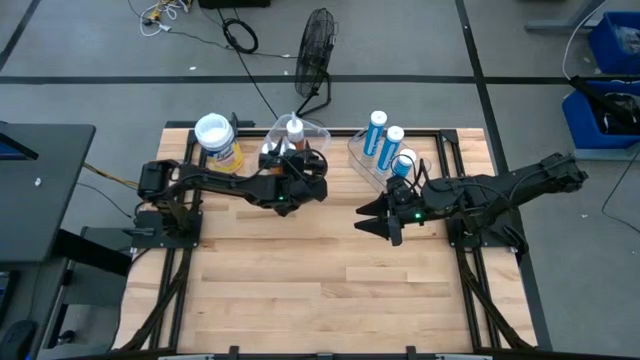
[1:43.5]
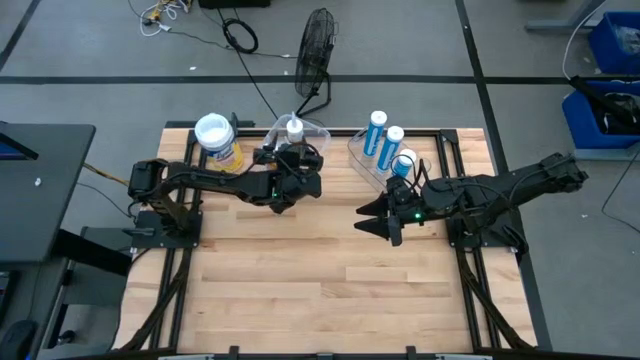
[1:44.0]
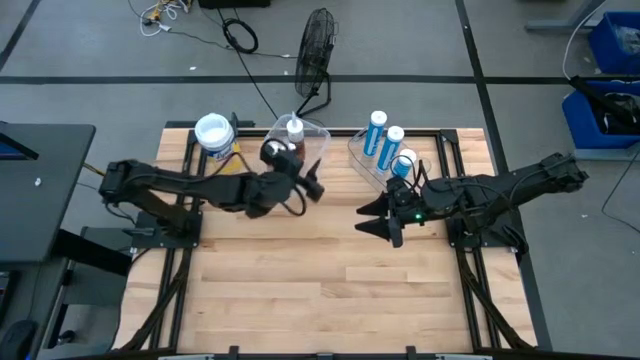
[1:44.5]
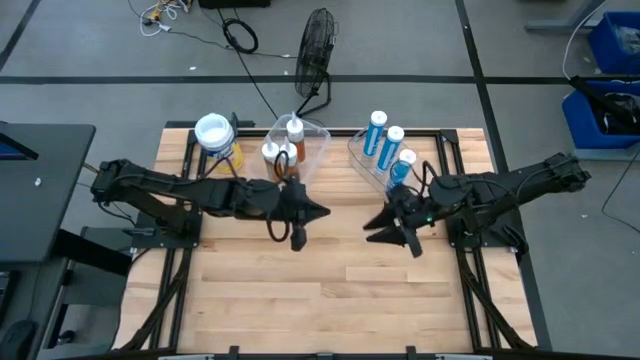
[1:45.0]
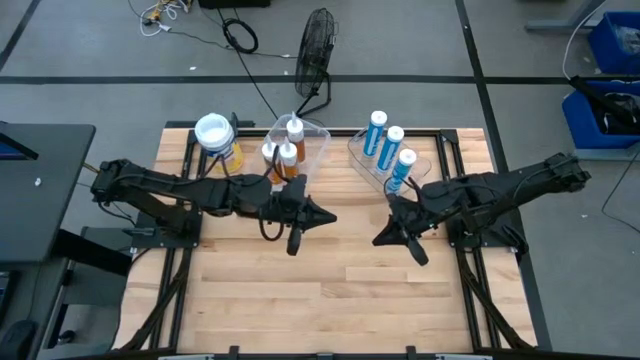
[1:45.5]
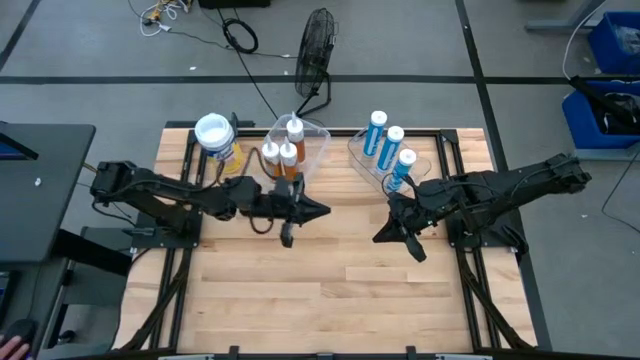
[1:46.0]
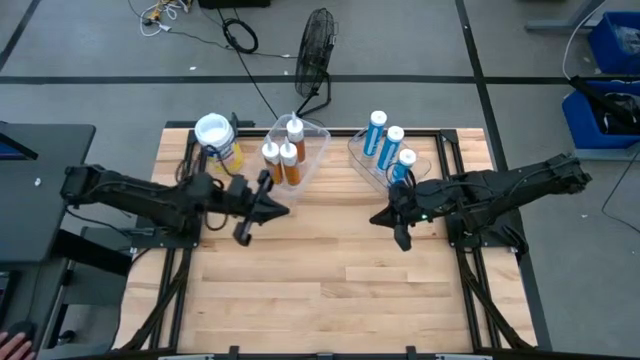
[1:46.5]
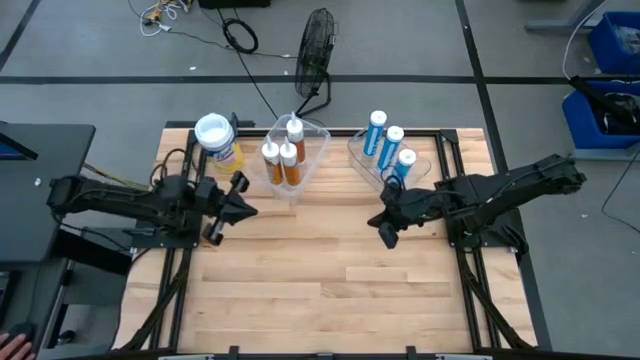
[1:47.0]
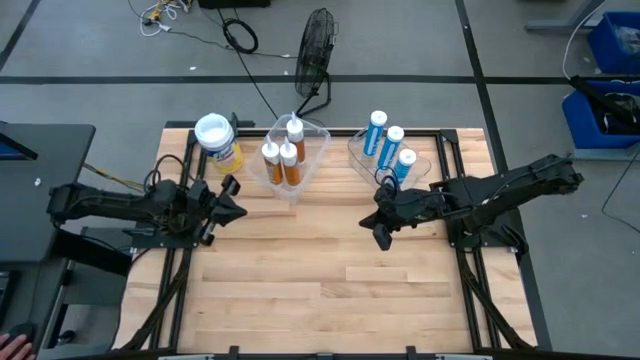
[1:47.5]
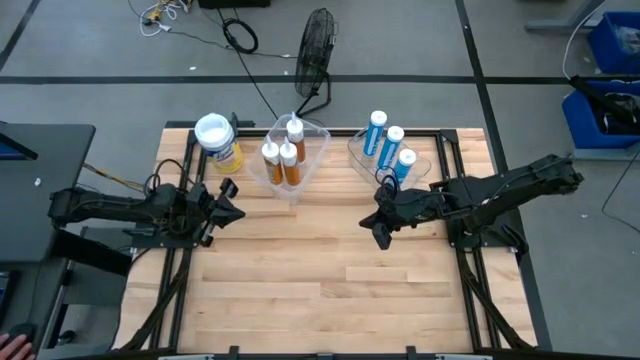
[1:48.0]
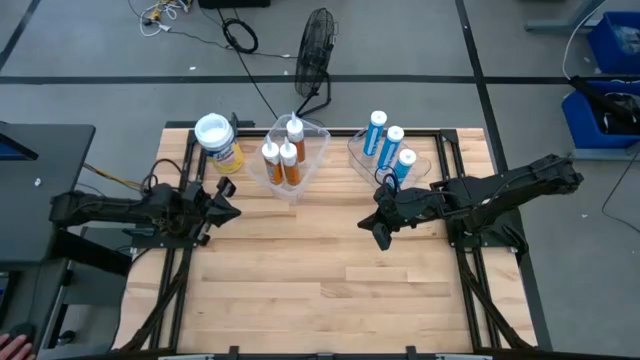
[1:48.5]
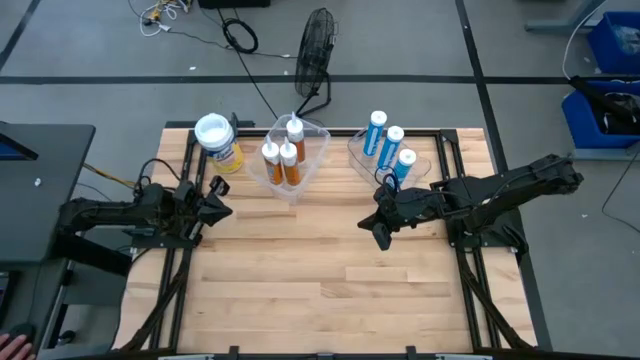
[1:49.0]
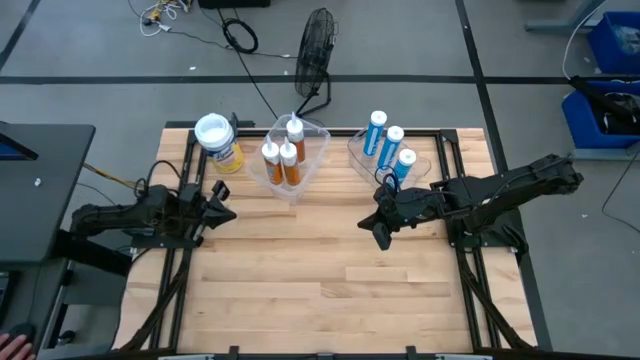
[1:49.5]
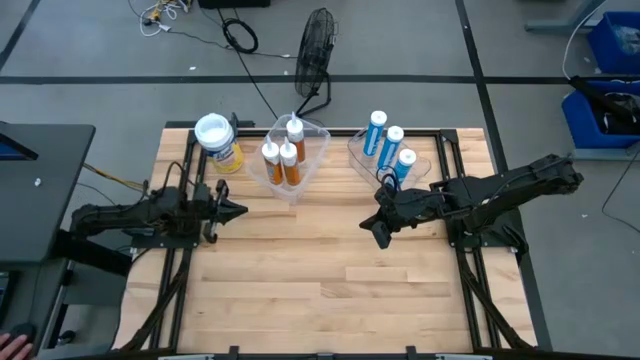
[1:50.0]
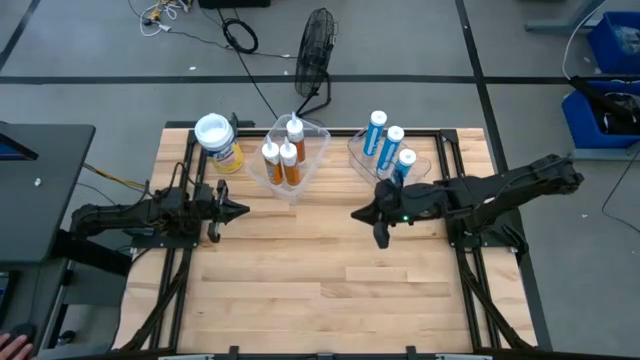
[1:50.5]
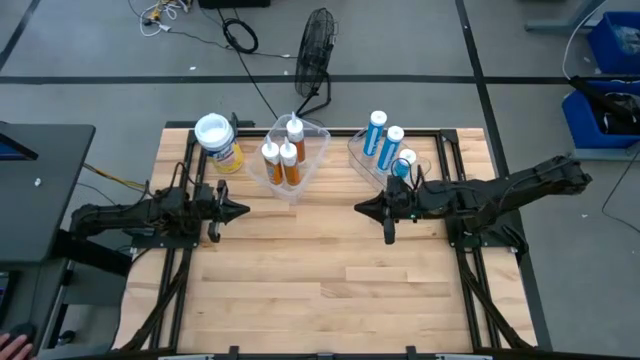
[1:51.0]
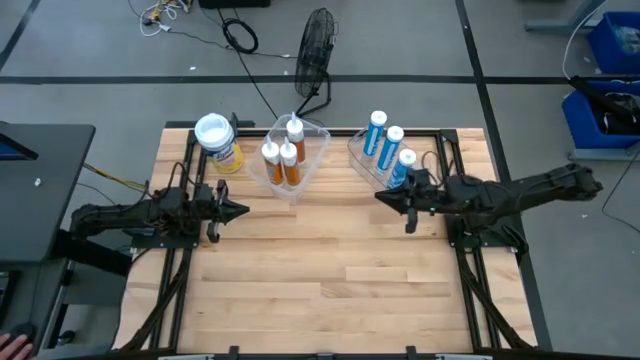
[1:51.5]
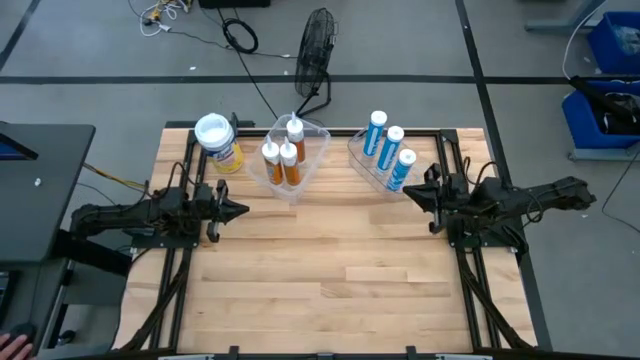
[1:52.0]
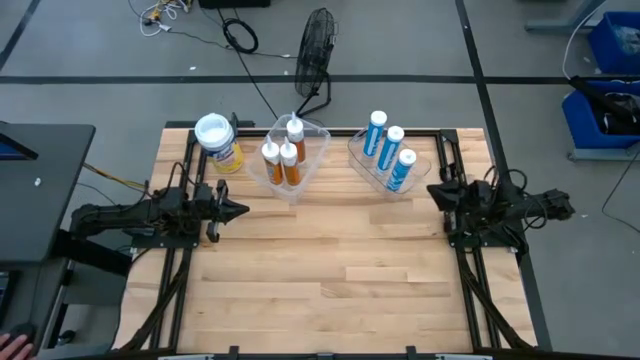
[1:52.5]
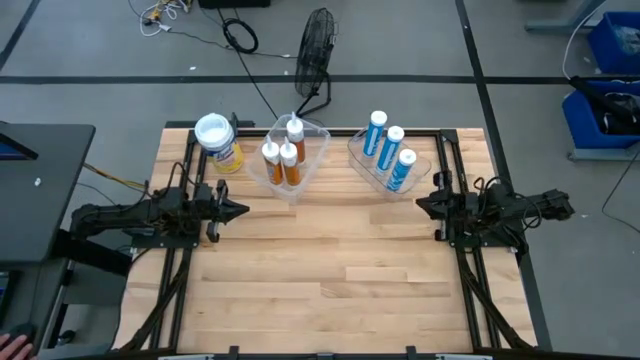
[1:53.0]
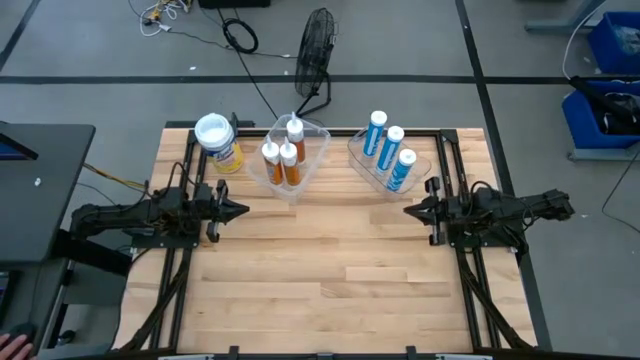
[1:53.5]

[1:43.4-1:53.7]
Task: Pick & place silicon tubes, Sealant and Lysol wipes
Return to Home Position

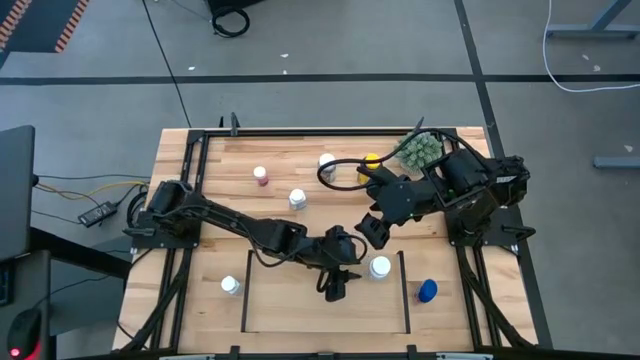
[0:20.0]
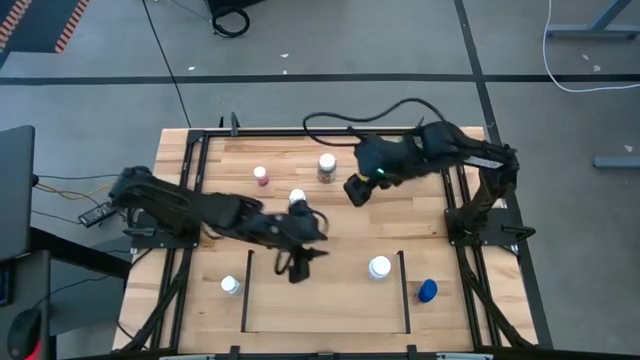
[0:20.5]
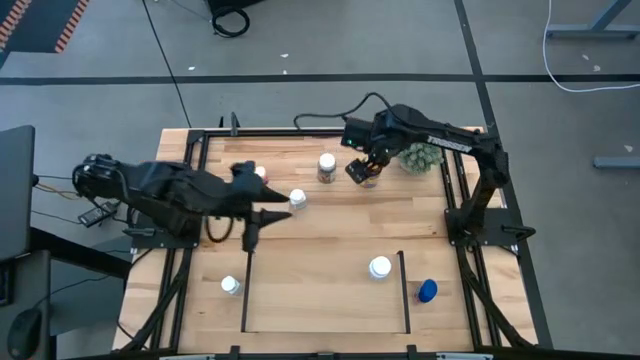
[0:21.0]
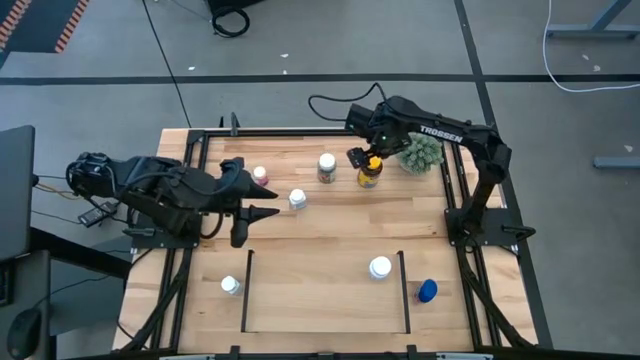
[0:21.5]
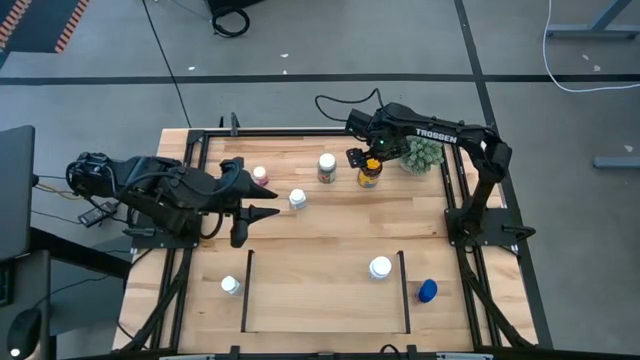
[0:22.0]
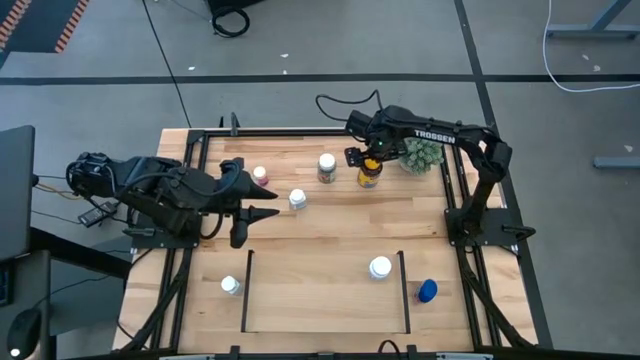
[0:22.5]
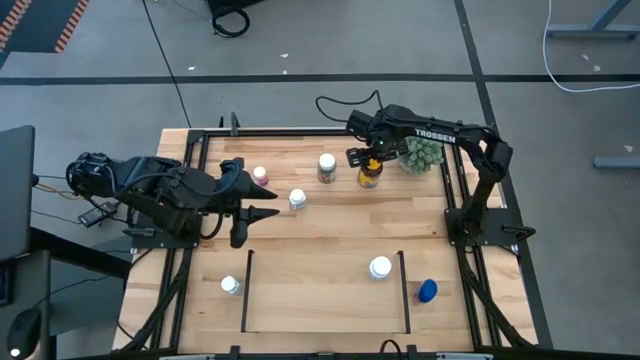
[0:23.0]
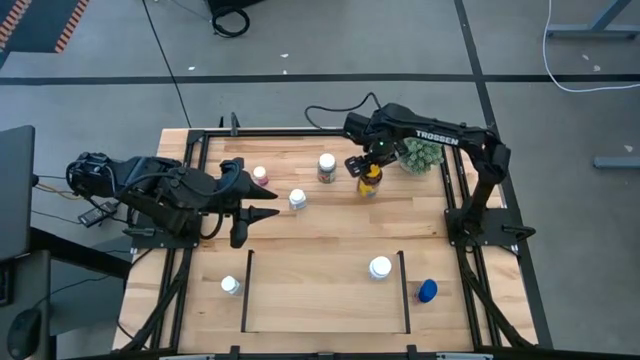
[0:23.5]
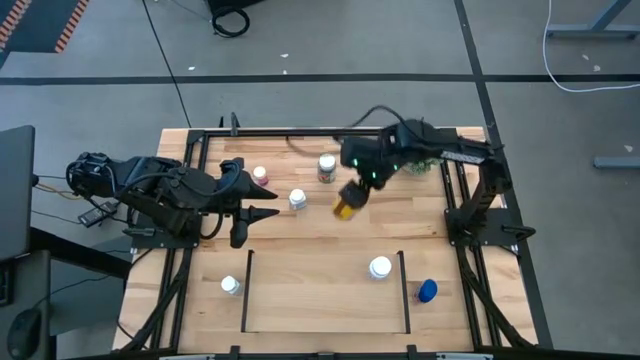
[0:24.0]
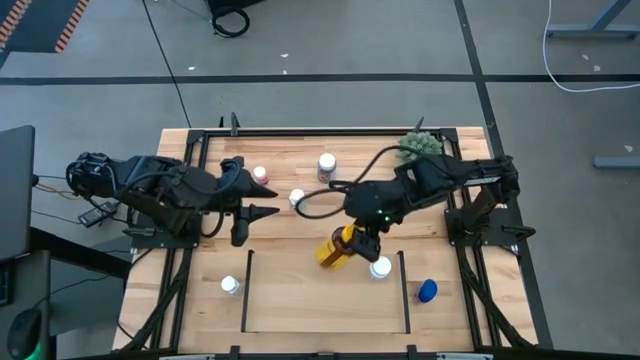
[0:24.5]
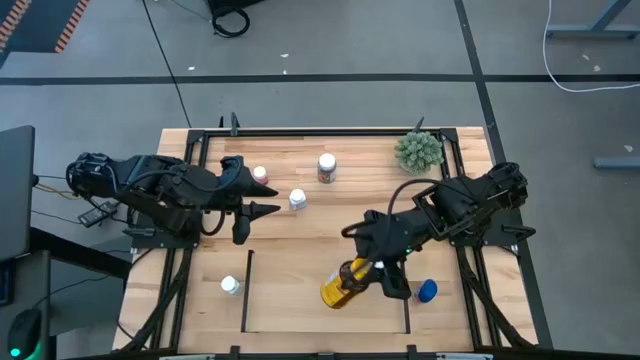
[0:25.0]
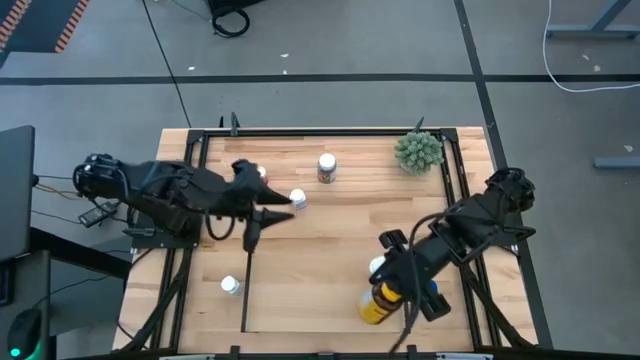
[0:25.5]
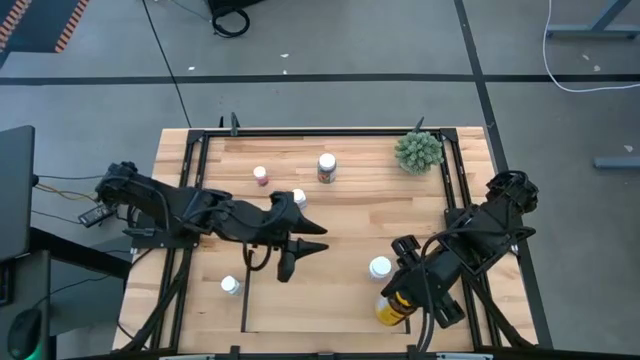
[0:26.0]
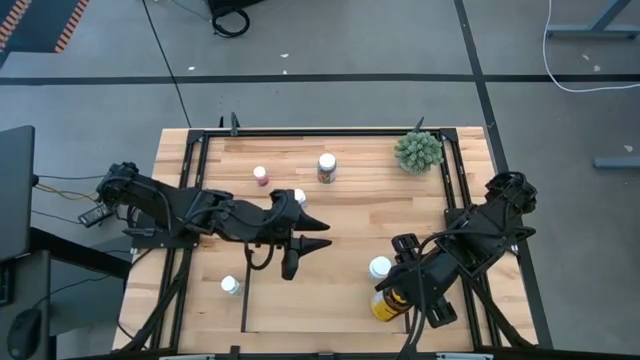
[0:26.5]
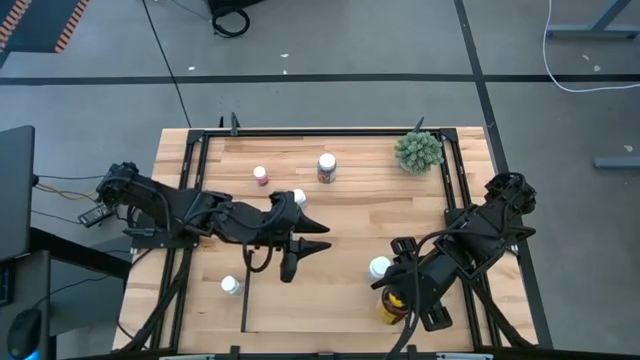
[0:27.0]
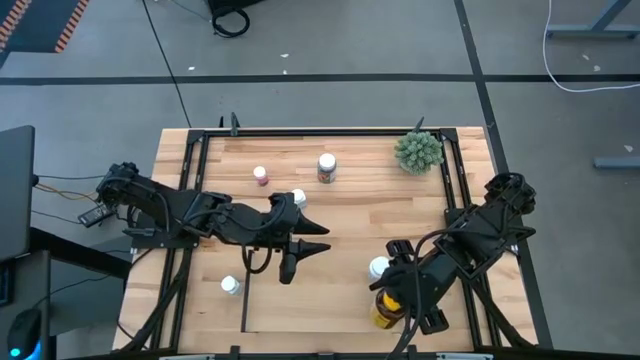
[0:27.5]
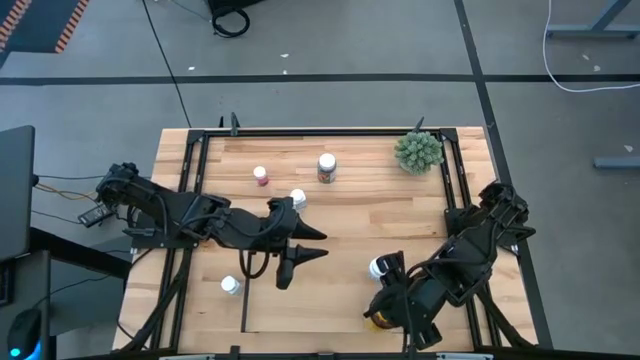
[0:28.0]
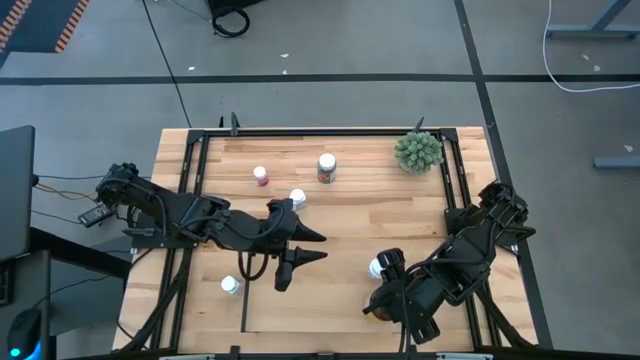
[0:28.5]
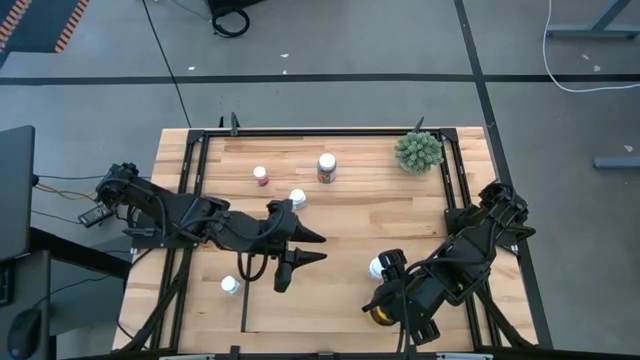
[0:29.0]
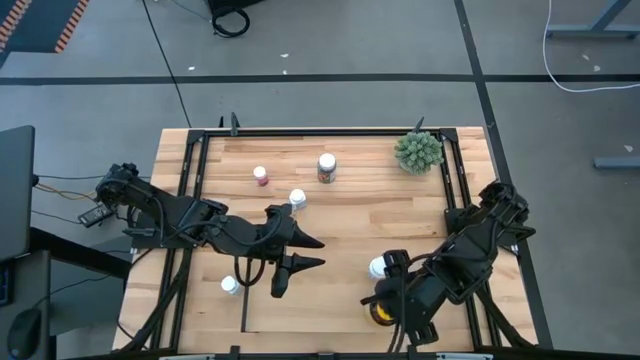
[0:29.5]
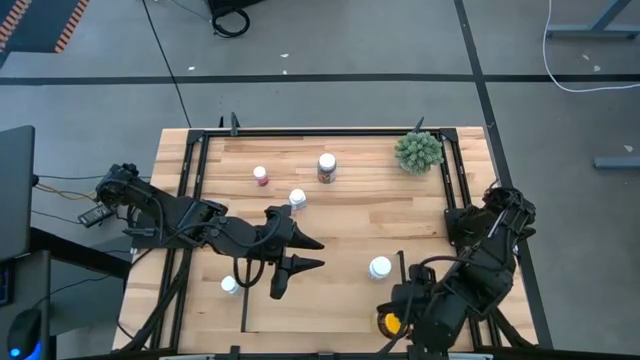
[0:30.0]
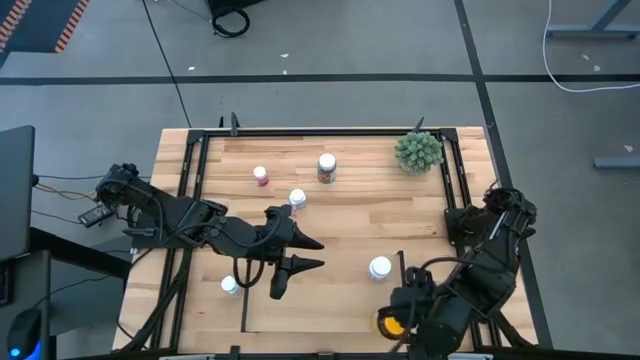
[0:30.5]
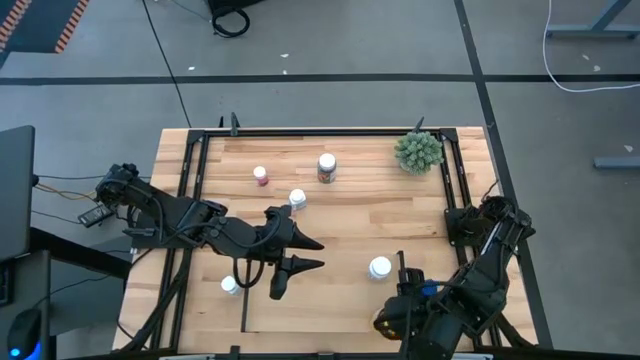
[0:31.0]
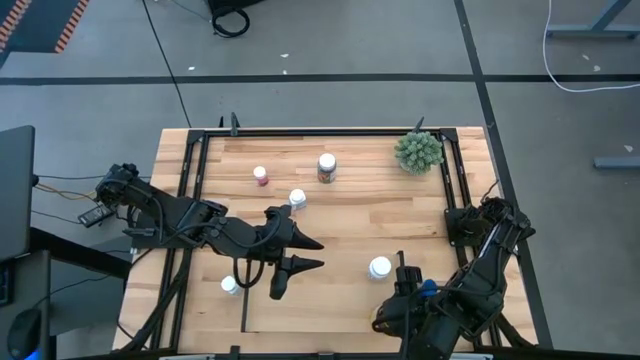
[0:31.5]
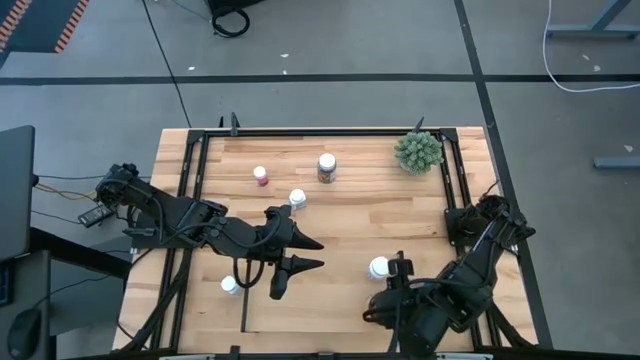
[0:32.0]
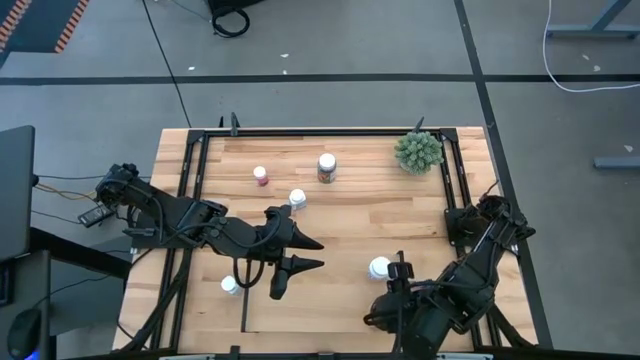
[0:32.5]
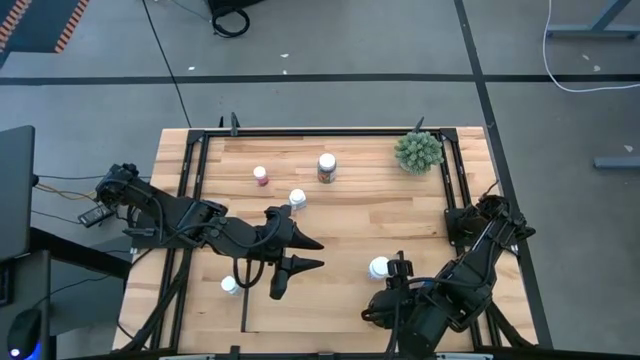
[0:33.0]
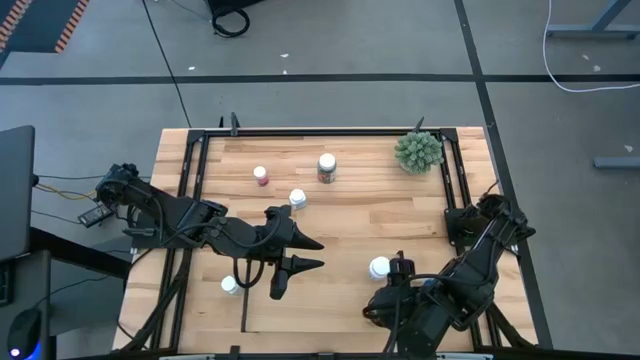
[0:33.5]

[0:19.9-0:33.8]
Task: Pick and place medicine bottles onto shelf by color
Put the yellow medicine bottle on the shelf
